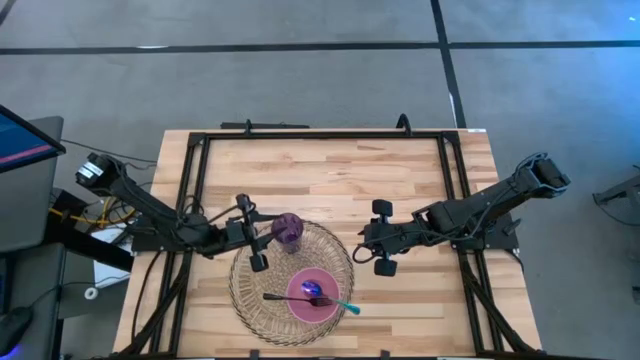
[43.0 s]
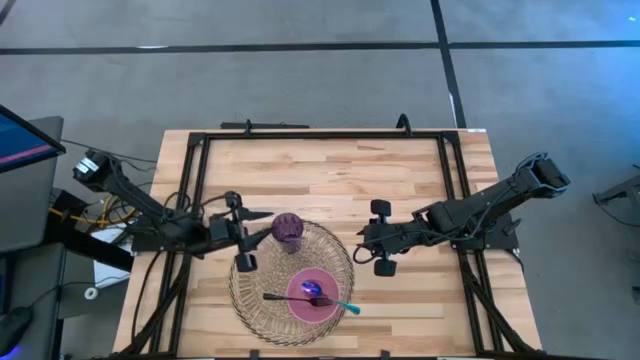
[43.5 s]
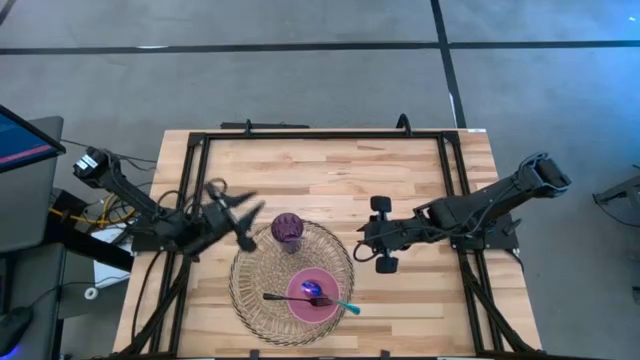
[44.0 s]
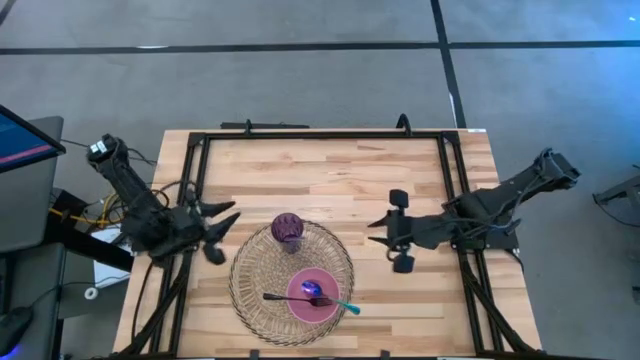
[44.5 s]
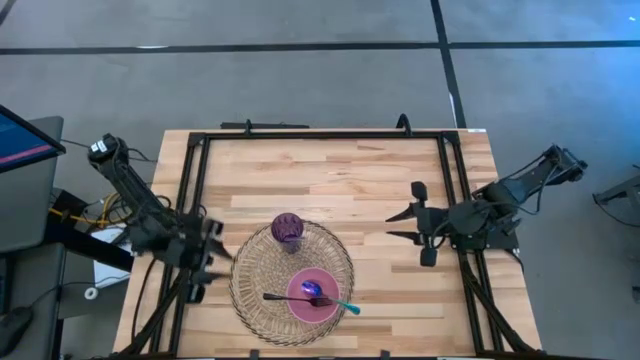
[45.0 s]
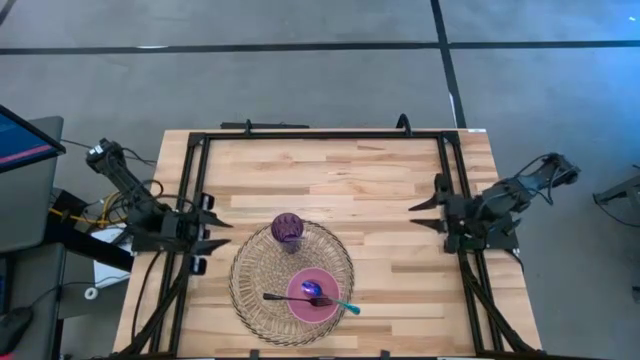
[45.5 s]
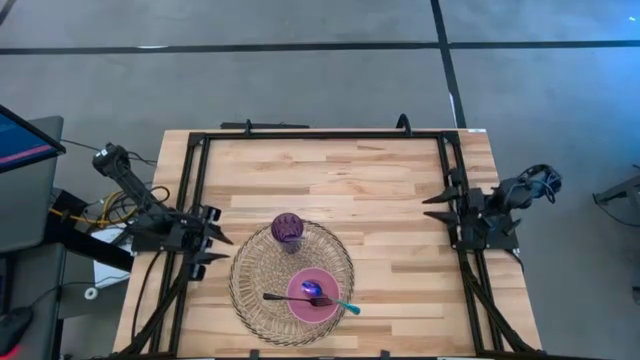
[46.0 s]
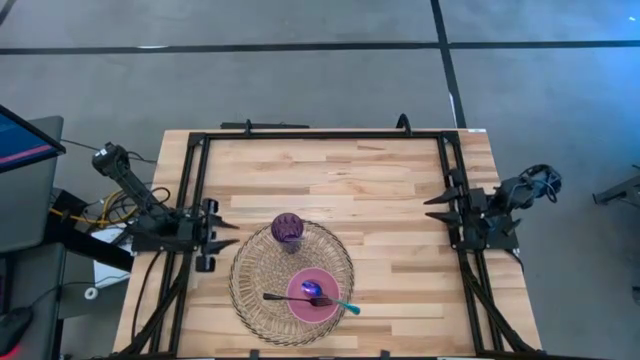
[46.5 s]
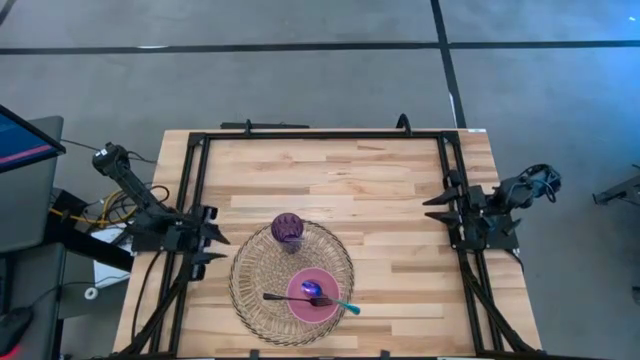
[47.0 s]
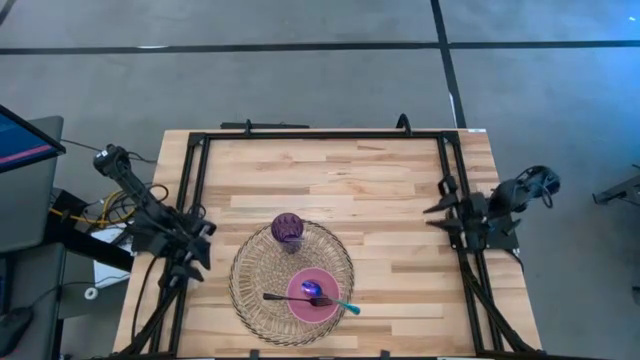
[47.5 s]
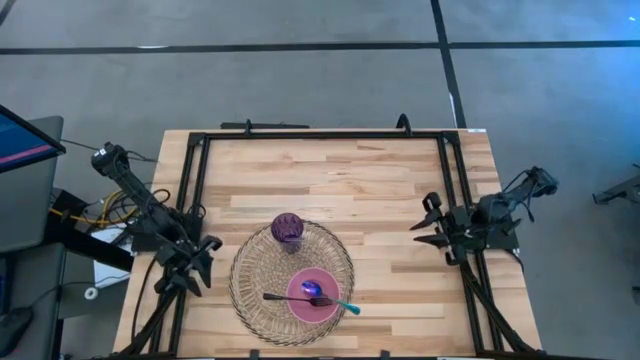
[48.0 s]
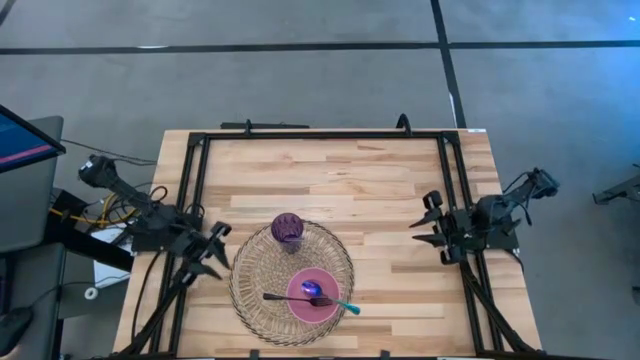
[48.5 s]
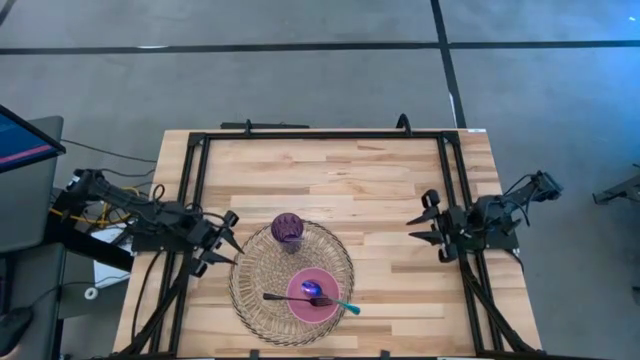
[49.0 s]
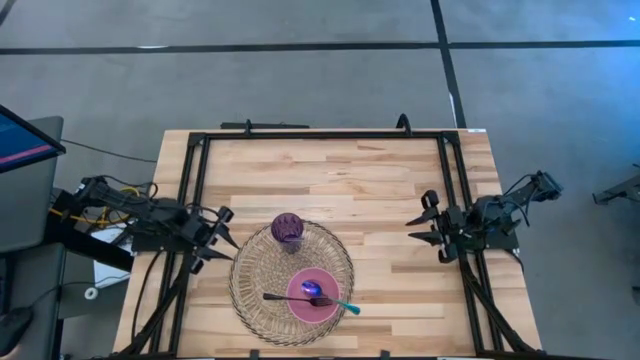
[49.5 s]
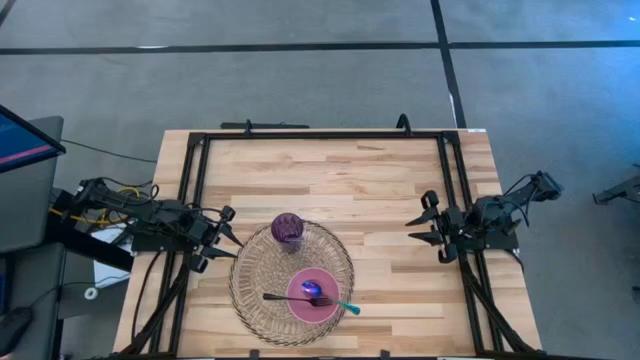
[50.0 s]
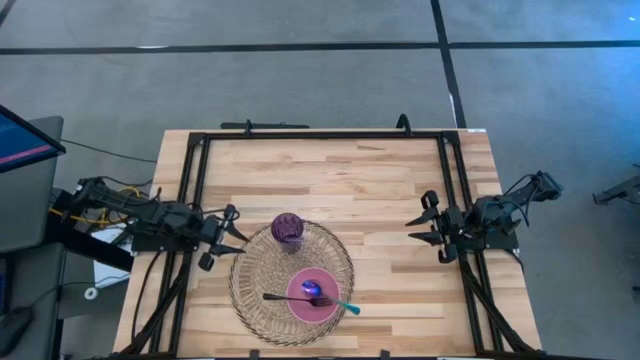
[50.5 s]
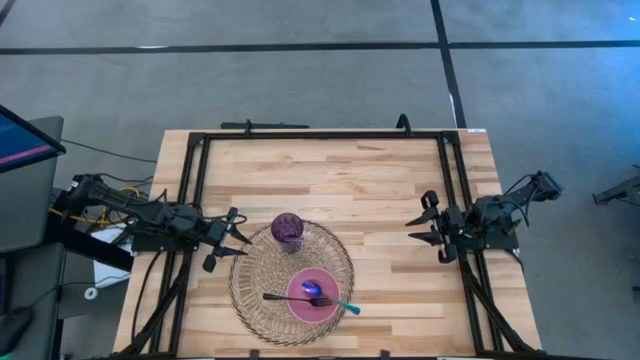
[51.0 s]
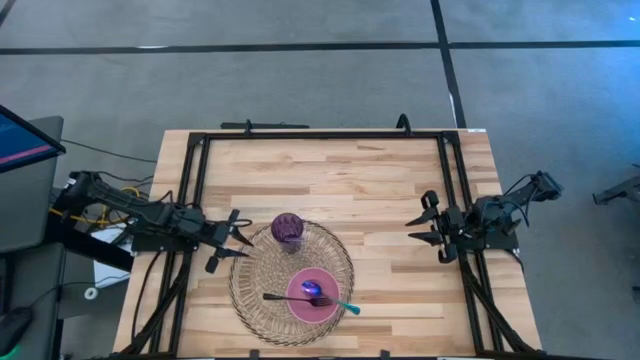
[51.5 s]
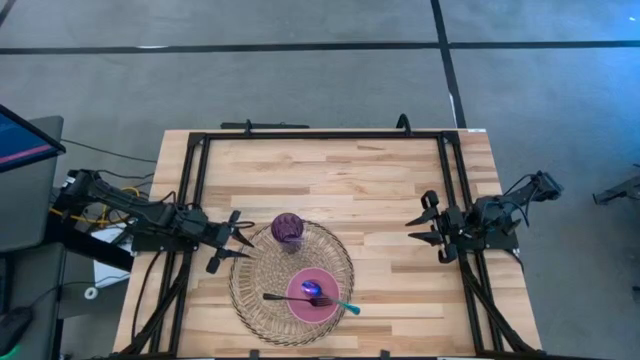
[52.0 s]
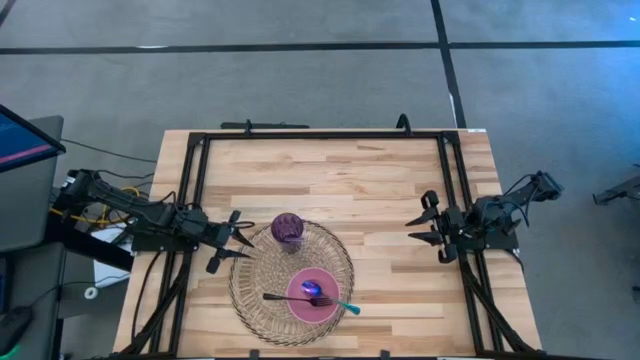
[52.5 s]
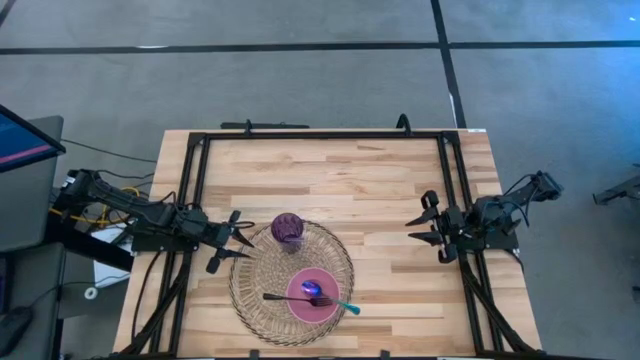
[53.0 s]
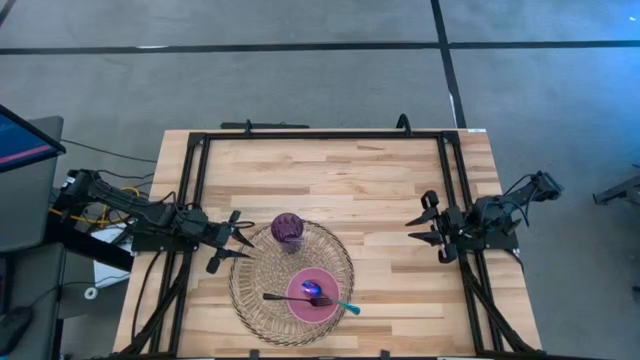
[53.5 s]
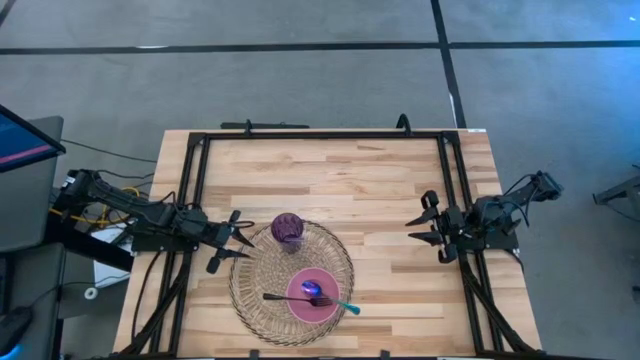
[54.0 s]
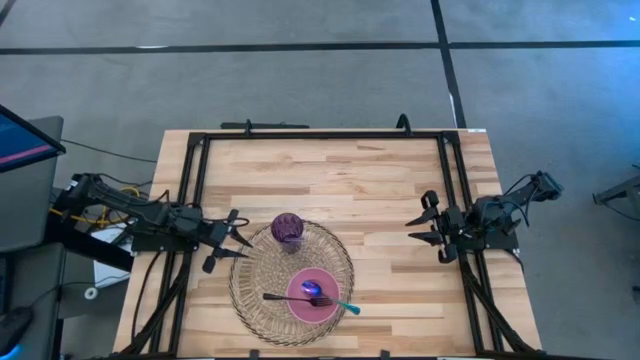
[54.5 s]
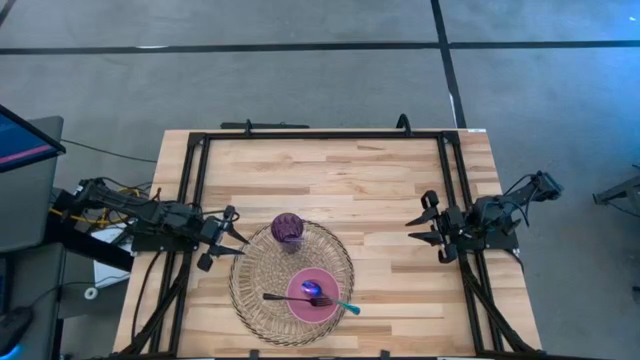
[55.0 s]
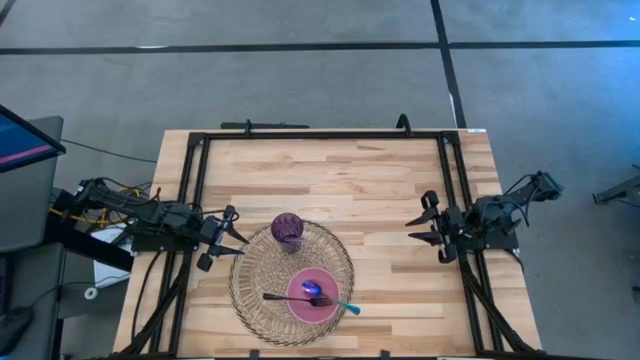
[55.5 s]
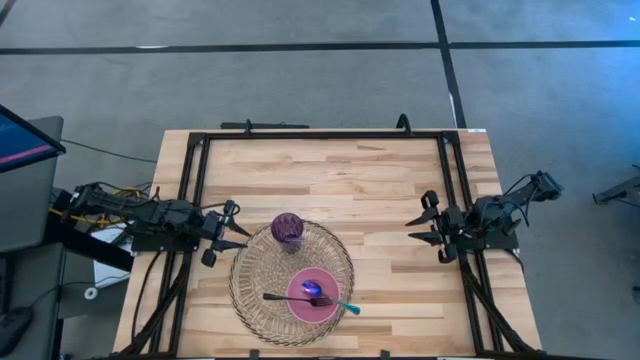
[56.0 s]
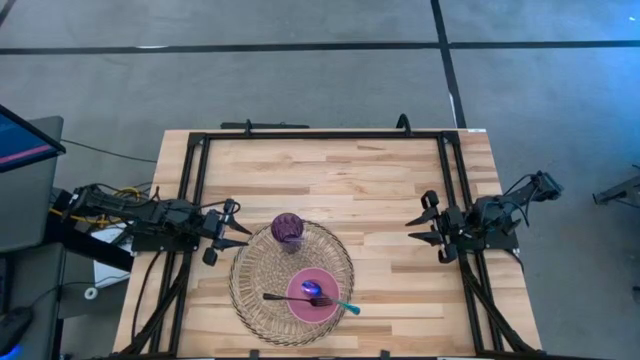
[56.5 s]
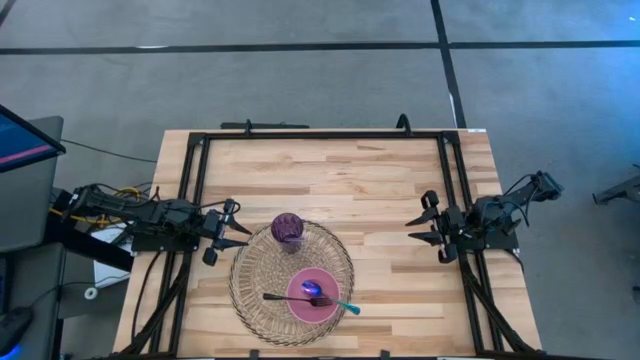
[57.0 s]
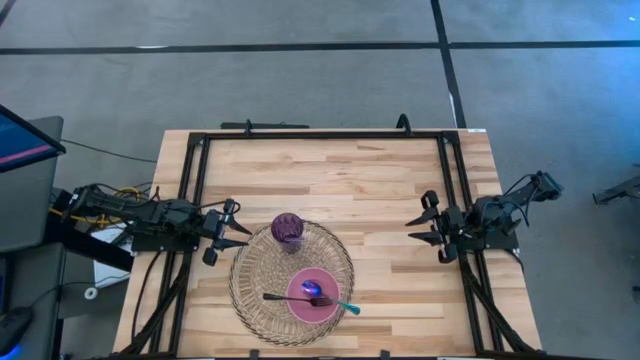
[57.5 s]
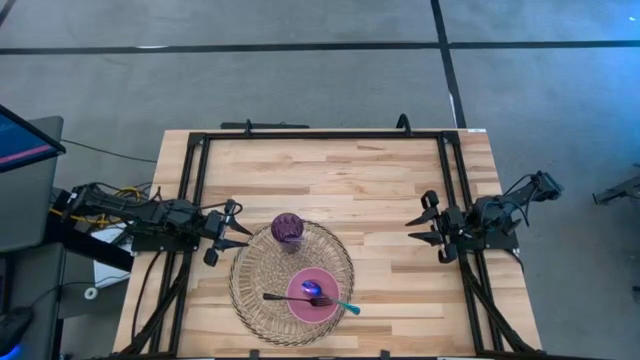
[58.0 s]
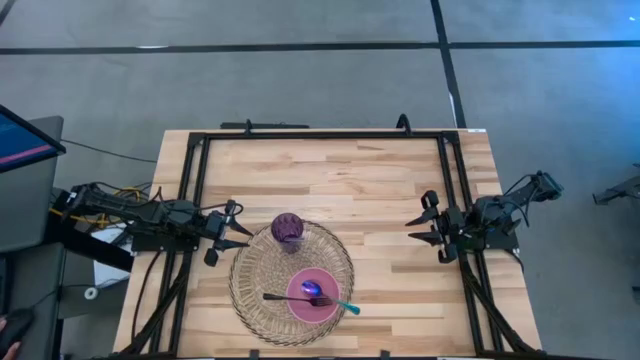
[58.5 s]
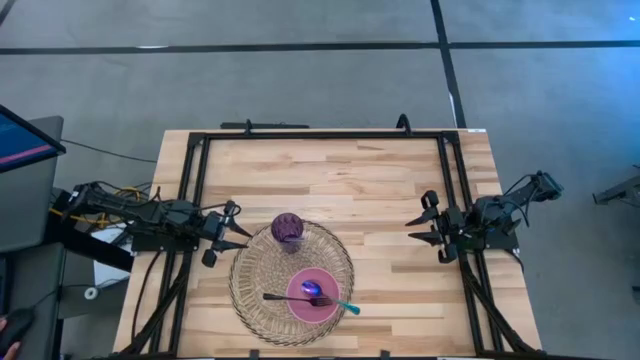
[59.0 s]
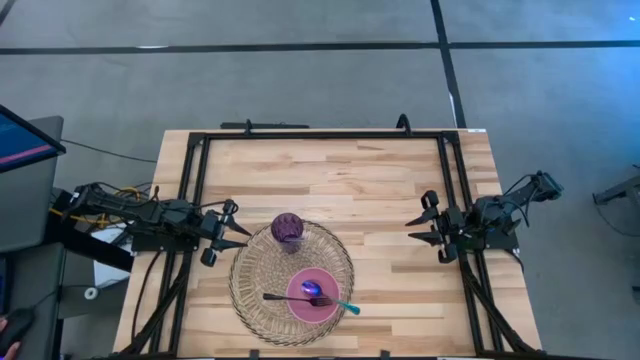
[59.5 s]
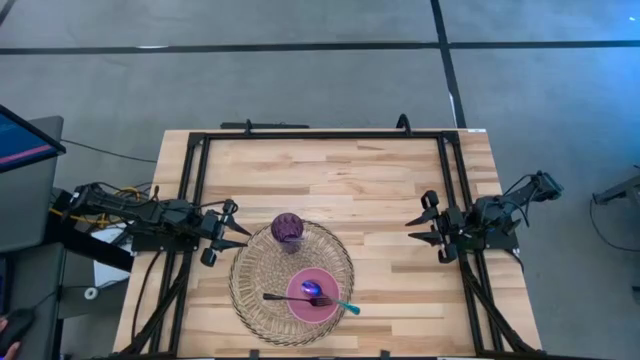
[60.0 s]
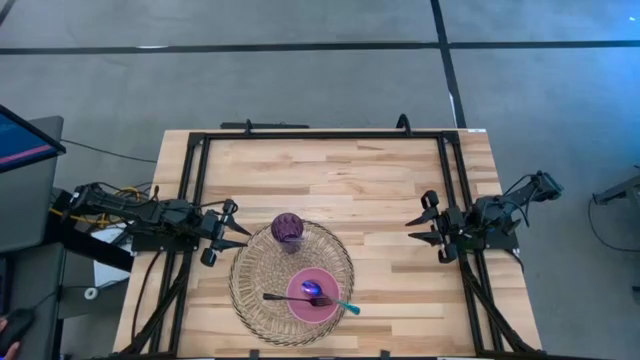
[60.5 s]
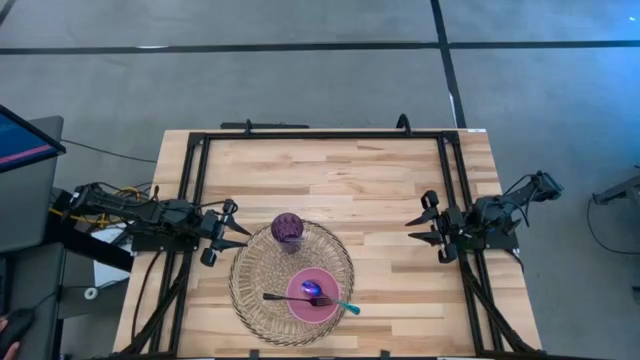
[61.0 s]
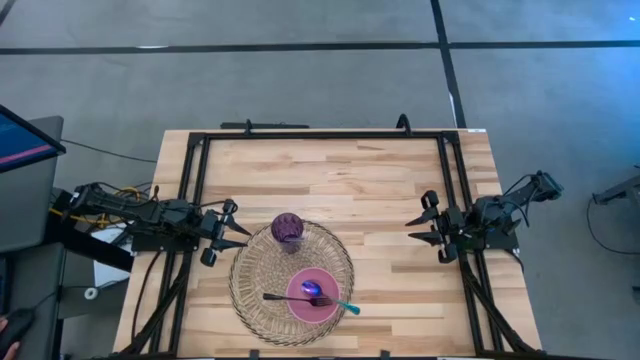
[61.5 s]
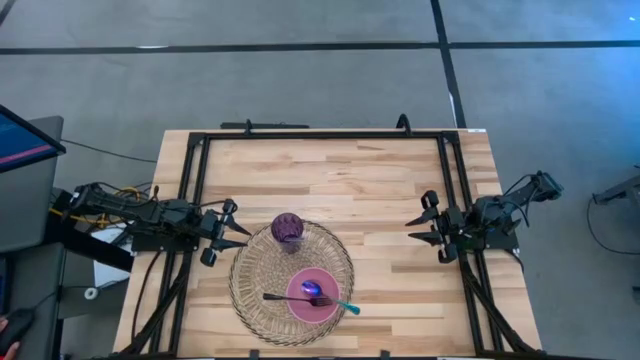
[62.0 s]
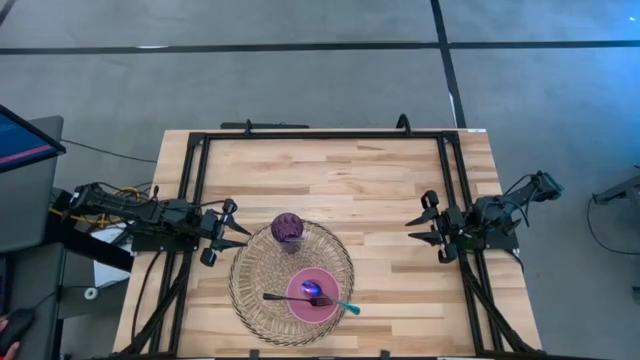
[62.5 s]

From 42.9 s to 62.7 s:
Task: Pick & Place Utensil
Return to Home Position
